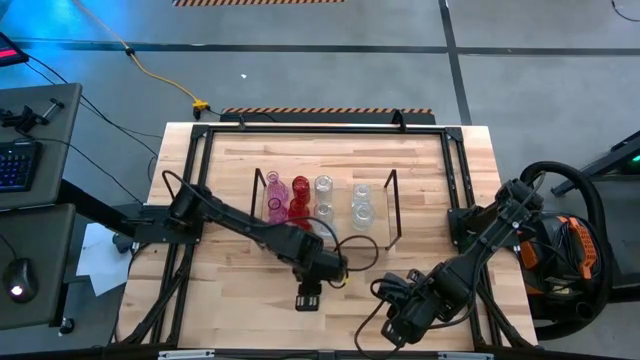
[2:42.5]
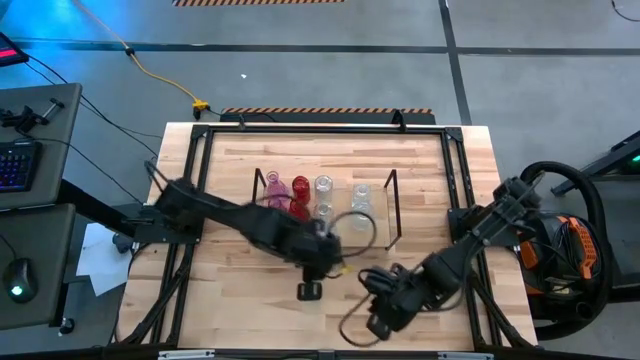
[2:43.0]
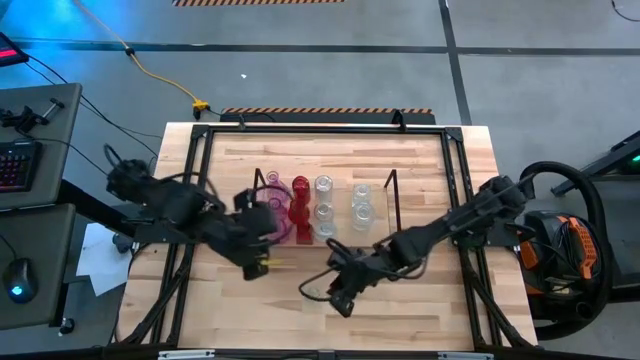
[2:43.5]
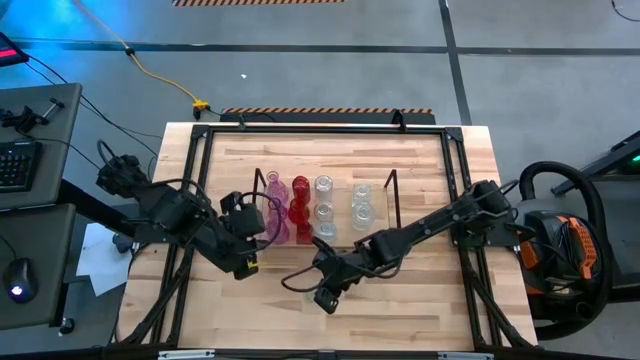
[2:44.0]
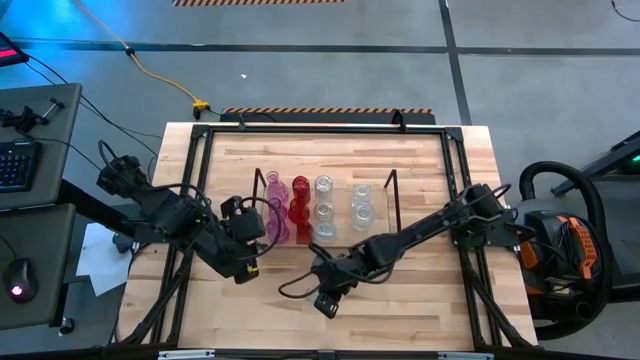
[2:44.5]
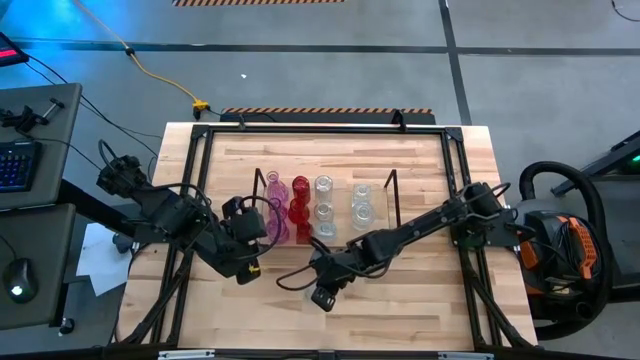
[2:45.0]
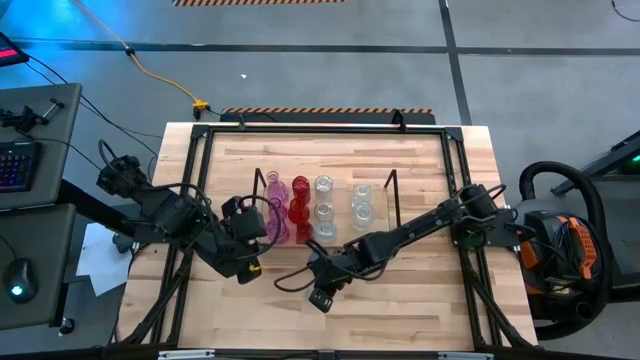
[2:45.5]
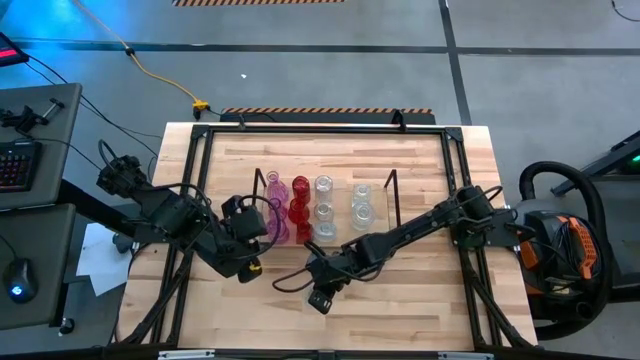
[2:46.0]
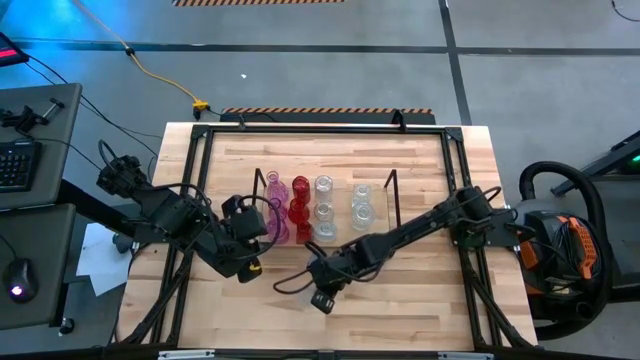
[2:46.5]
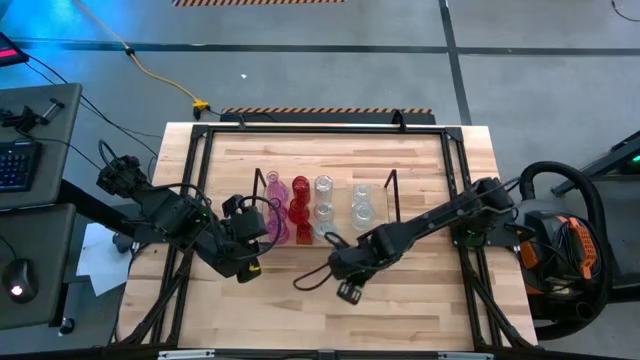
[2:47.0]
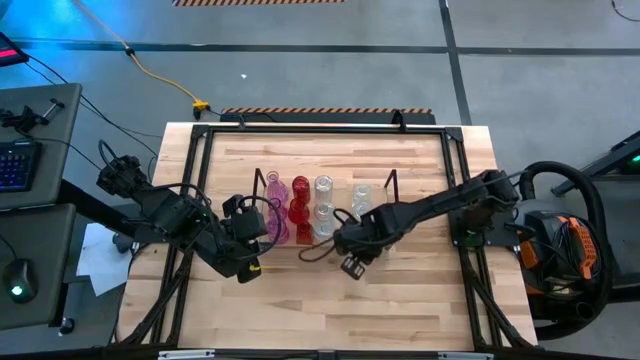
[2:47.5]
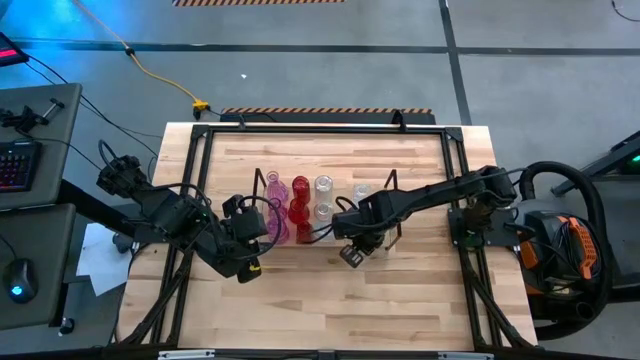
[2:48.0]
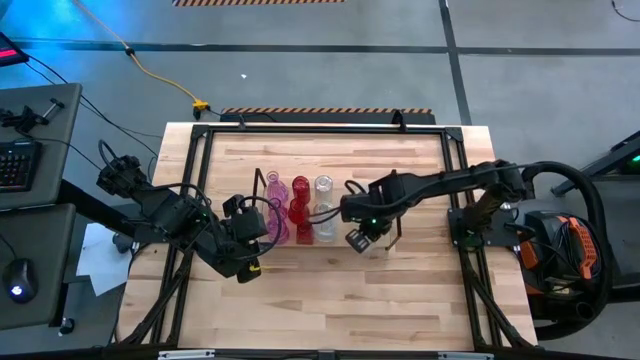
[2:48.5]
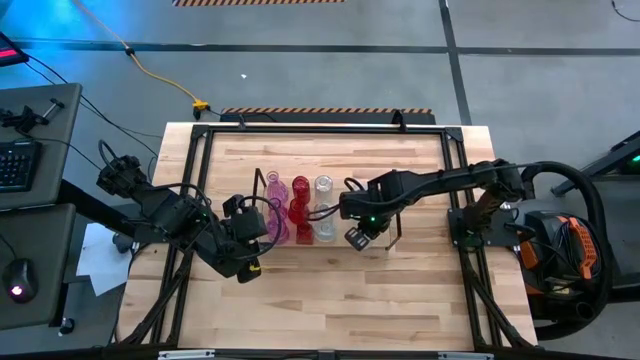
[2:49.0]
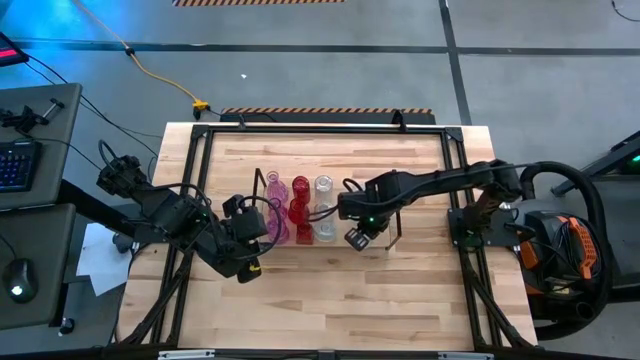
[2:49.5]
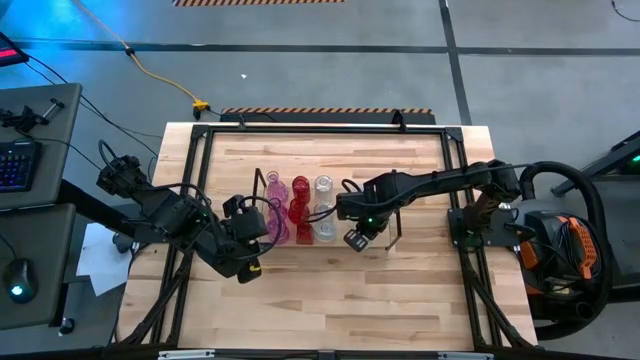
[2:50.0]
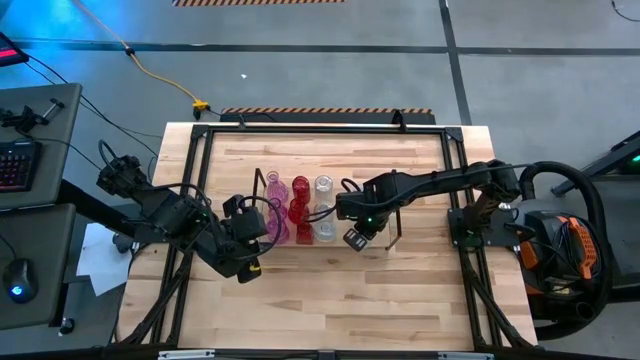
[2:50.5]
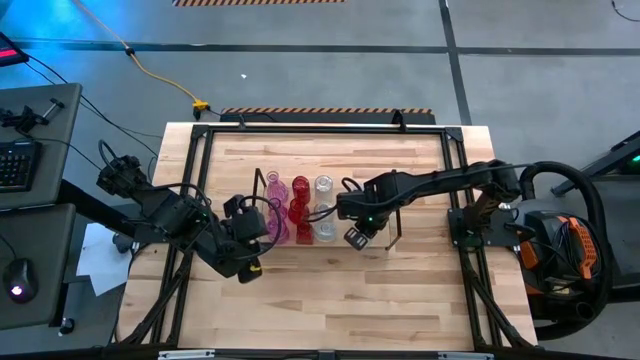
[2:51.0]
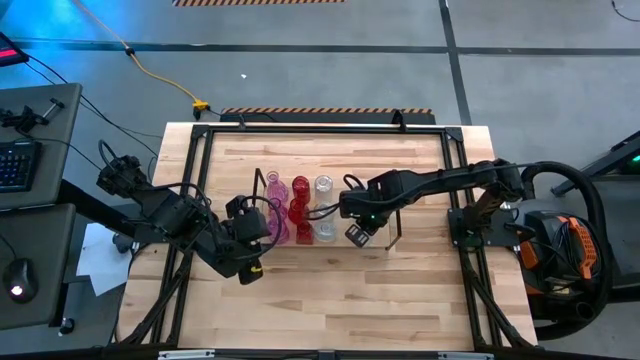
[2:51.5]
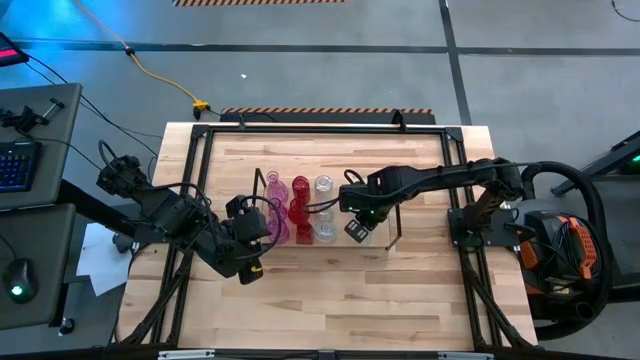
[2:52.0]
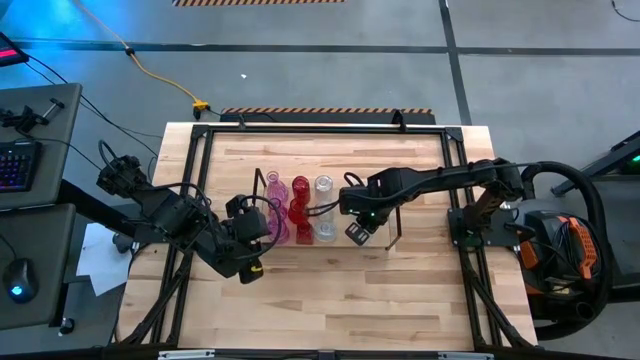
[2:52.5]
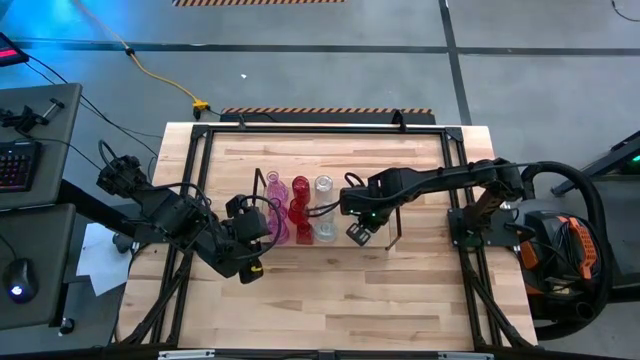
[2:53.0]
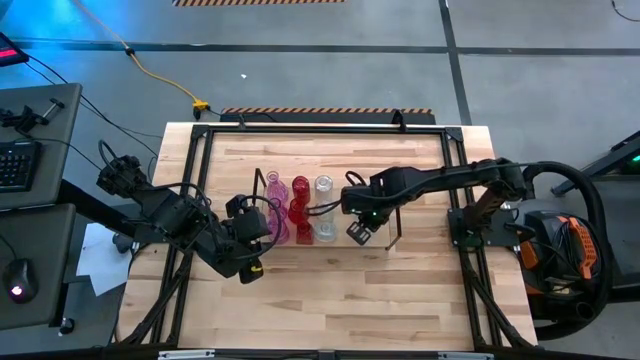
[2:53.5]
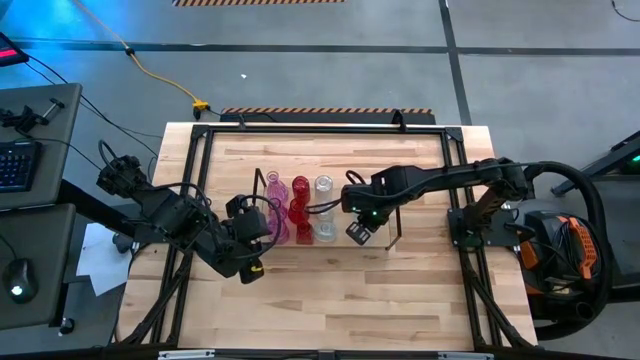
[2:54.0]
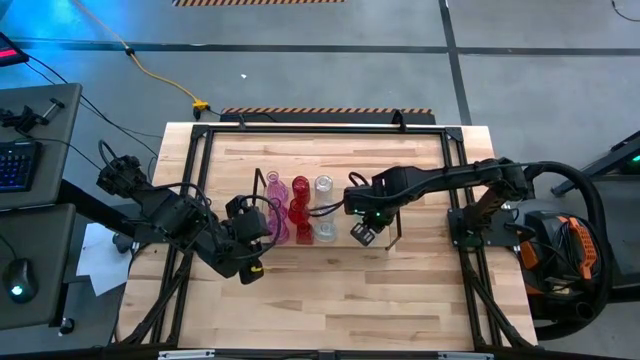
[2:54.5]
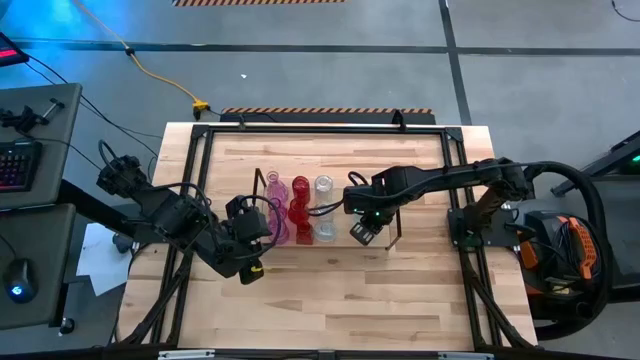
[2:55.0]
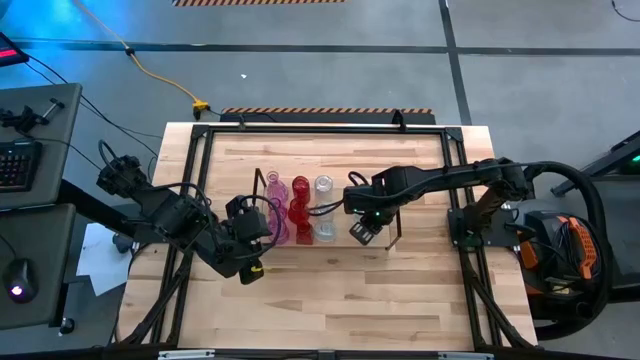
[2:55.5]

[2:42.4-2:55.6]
Task: sort vases onto shelf
Put the transparent vase aligned with the other transparent vases on the shelf

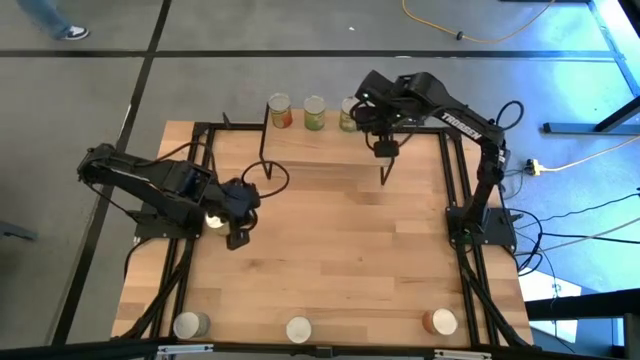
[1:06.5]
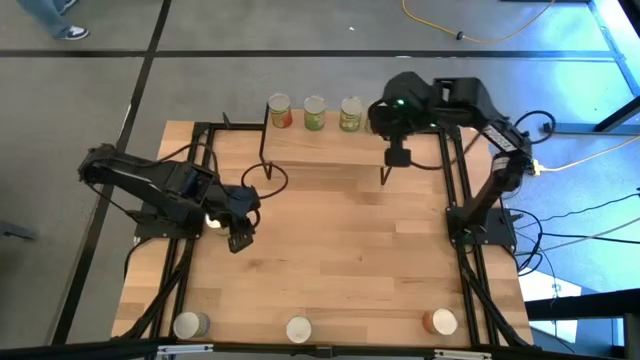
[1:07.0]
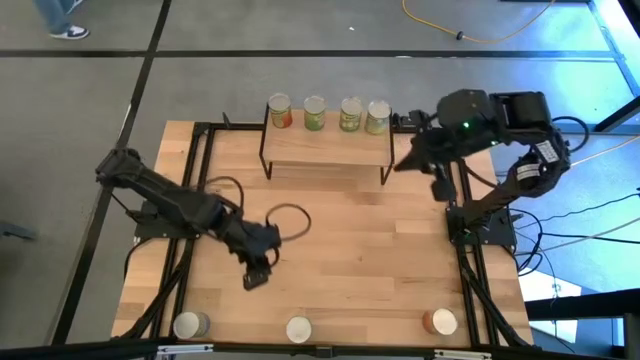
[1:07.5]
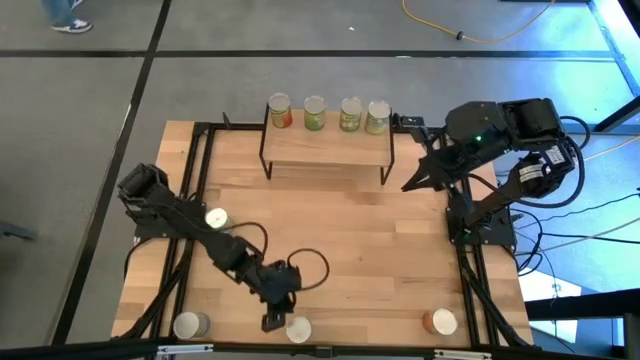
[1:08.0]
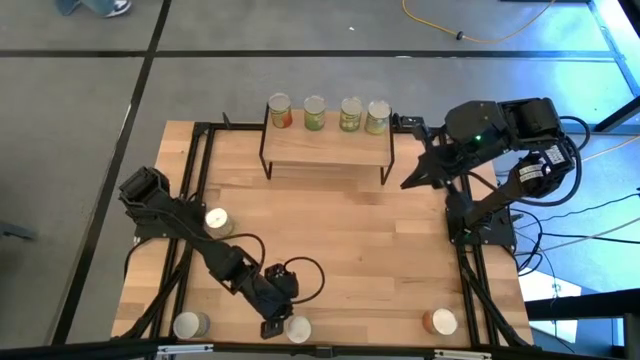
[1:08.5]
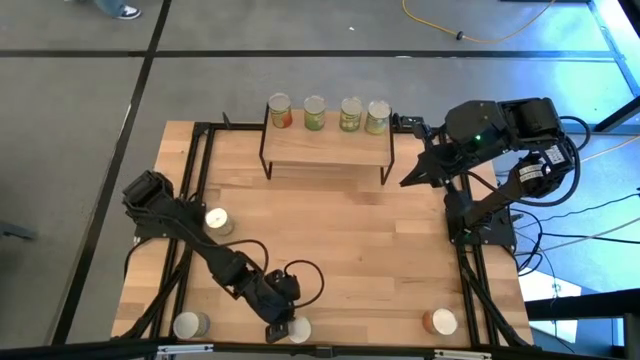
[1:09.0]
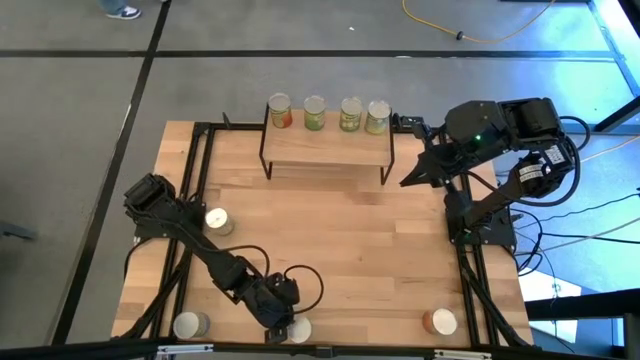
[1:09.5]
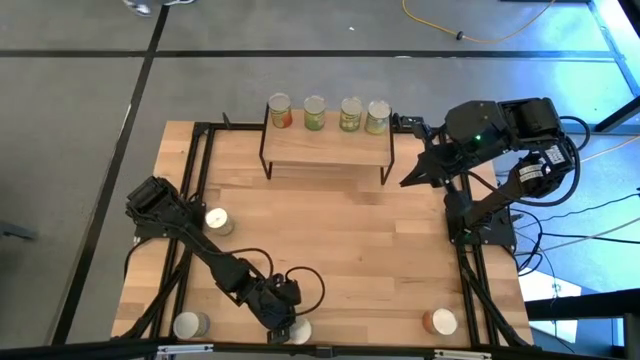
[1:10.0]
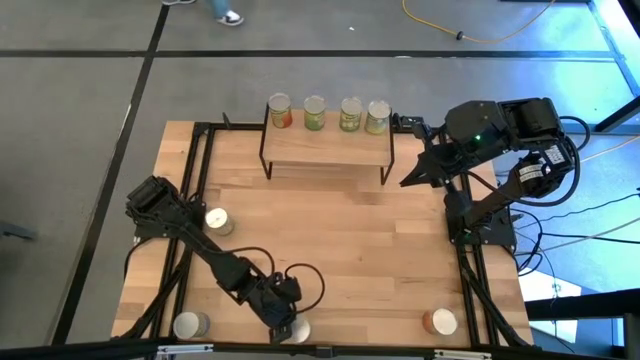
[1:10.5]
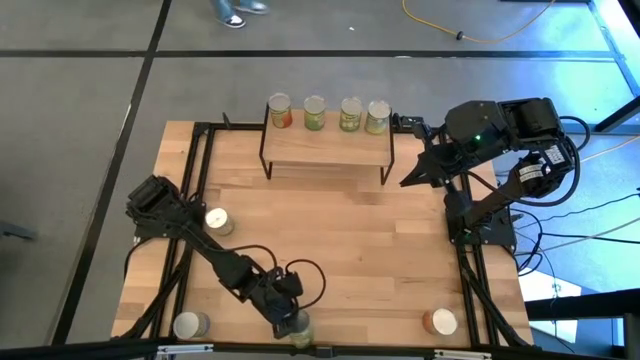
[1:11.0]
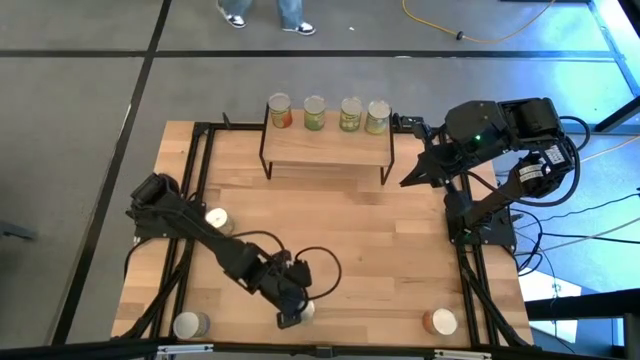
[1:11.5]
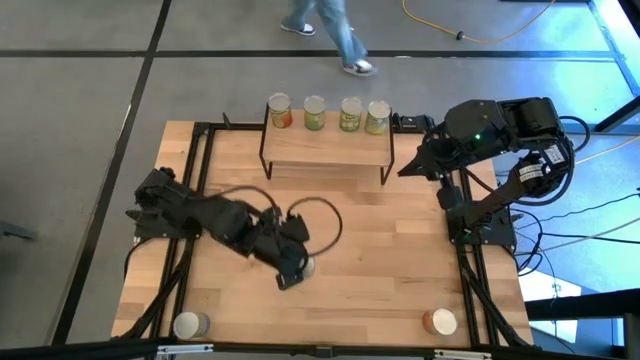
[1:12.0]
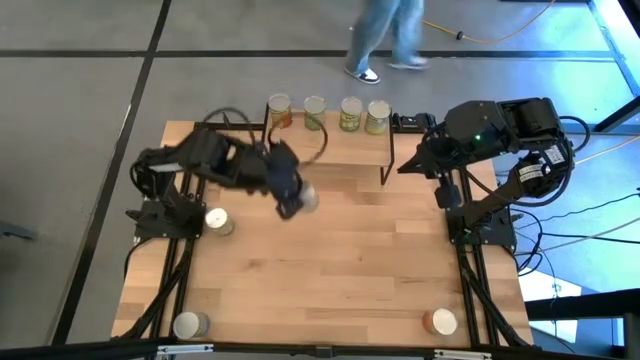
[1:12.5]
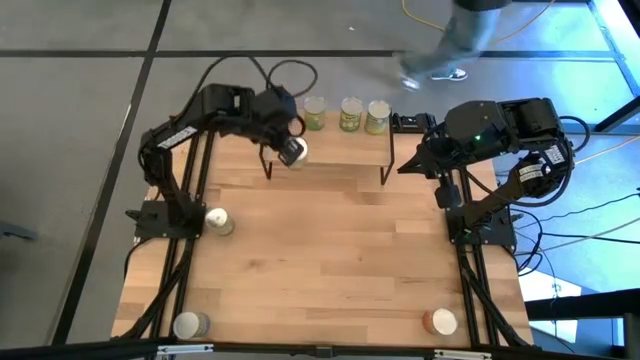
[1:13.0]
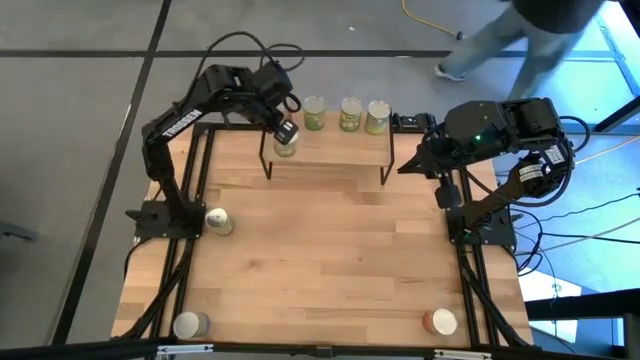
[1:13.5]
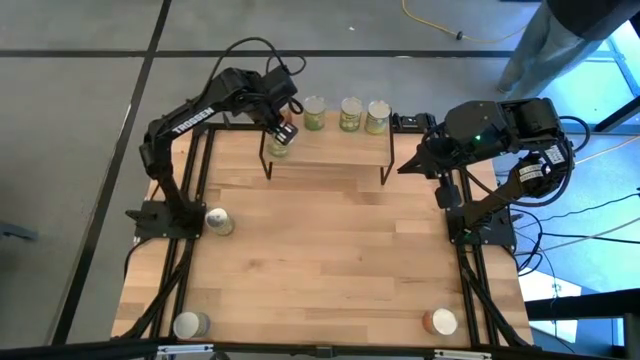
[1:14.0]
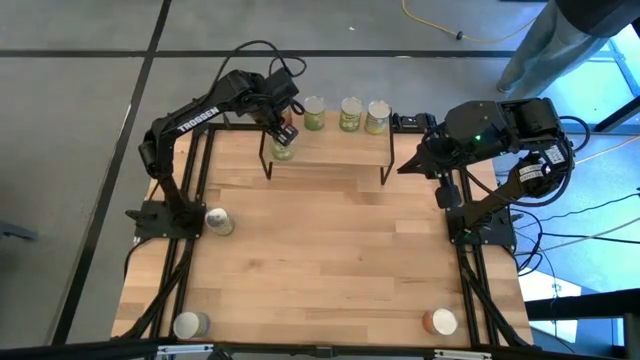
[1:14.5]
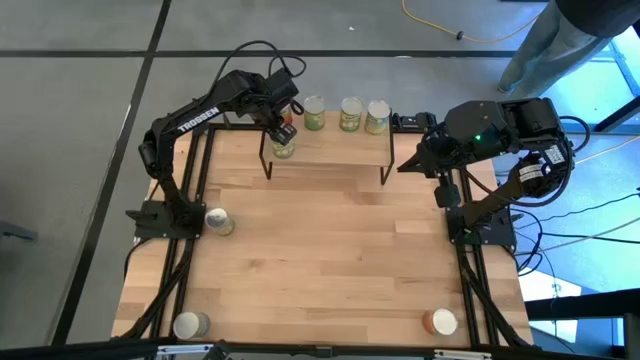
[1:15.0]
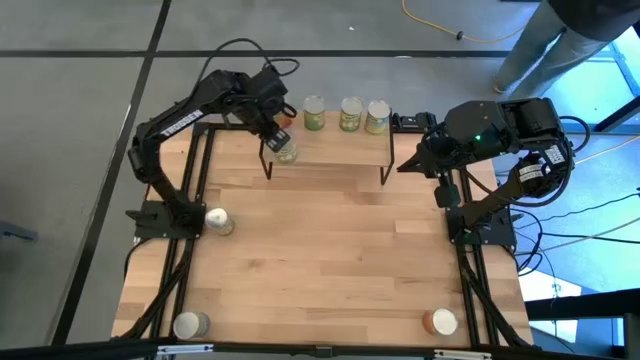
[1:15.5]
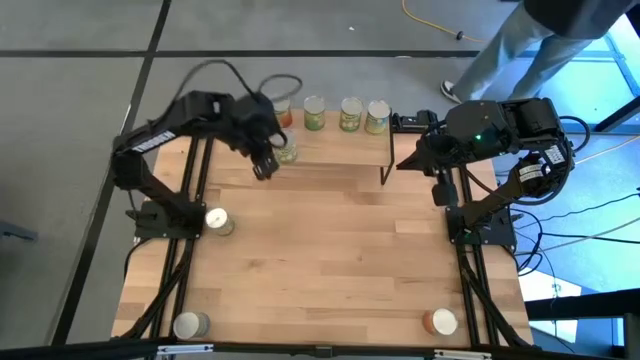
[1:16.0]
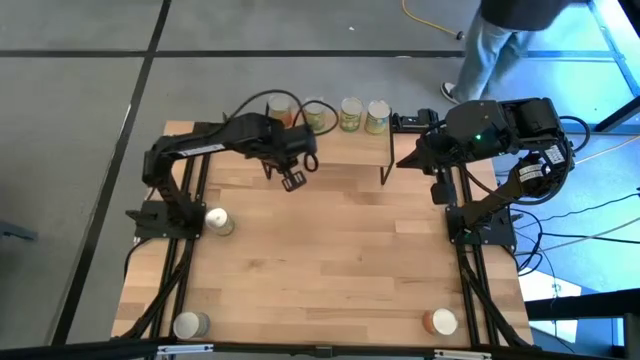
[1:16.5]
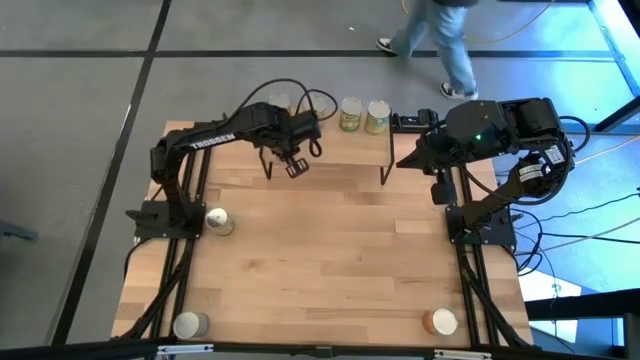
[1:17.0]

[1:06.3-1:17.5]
Task: Pick and place cans onto a shelf
Put the canned pears on the shelf
